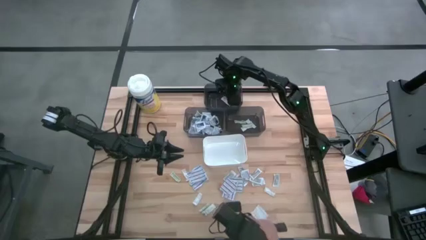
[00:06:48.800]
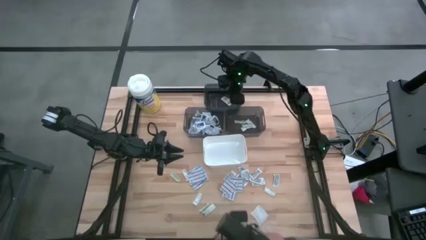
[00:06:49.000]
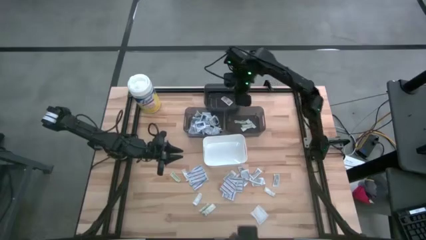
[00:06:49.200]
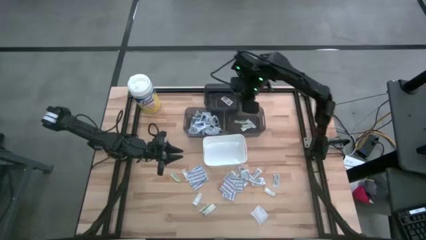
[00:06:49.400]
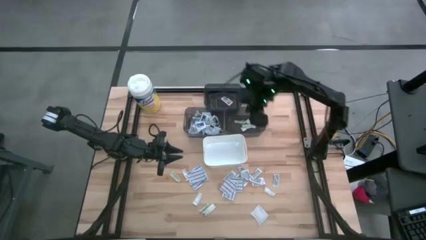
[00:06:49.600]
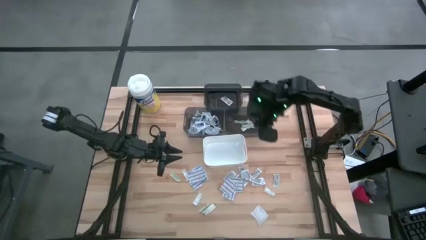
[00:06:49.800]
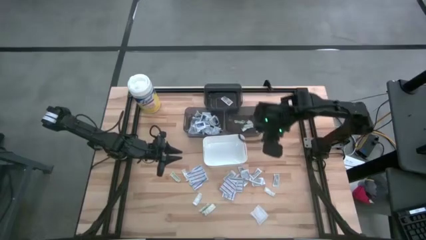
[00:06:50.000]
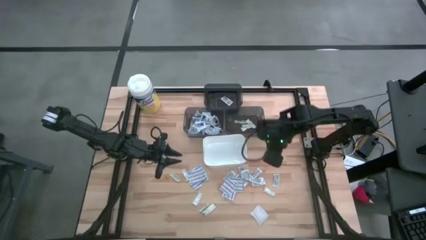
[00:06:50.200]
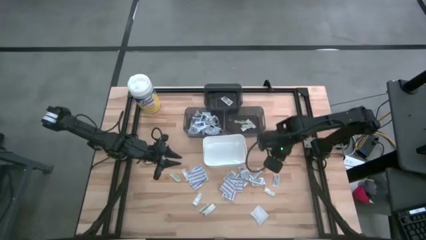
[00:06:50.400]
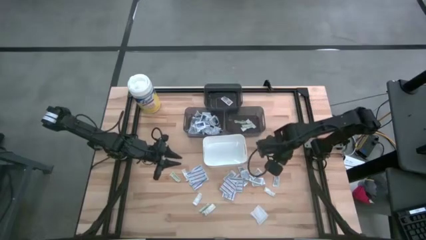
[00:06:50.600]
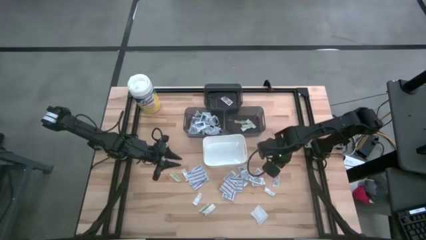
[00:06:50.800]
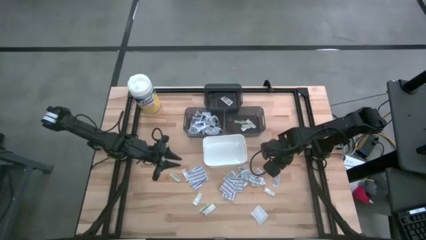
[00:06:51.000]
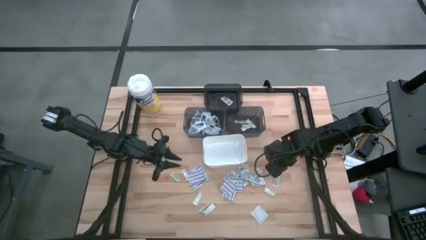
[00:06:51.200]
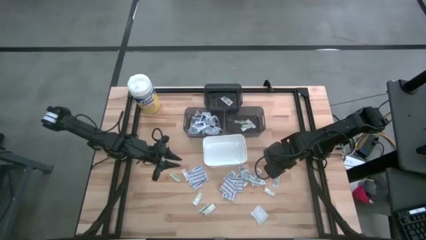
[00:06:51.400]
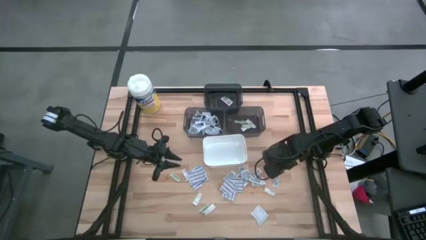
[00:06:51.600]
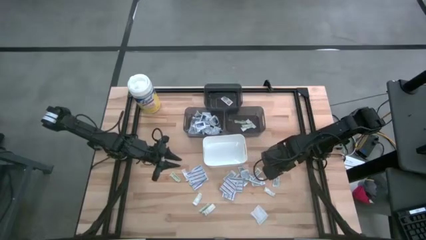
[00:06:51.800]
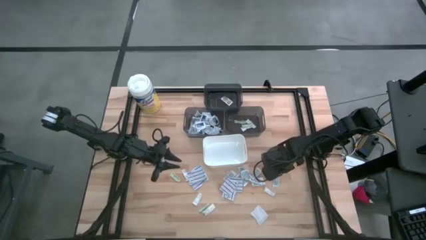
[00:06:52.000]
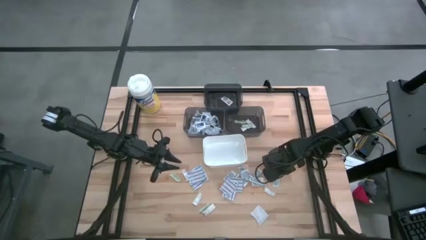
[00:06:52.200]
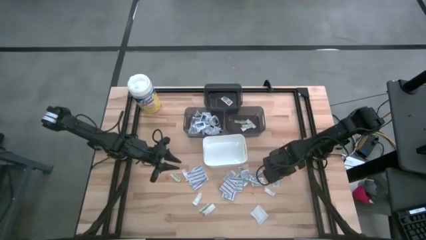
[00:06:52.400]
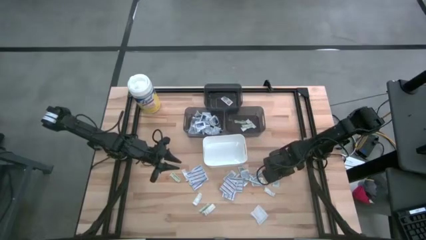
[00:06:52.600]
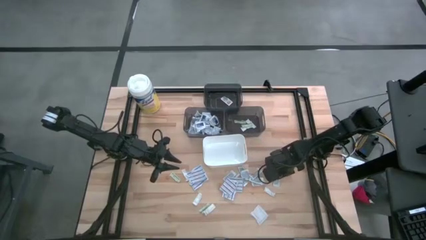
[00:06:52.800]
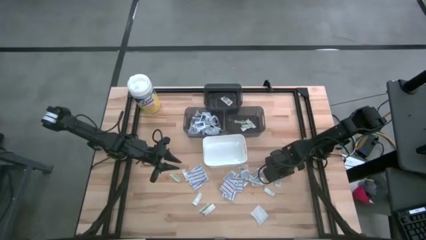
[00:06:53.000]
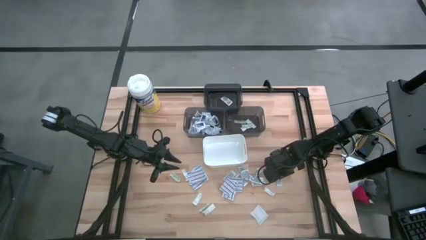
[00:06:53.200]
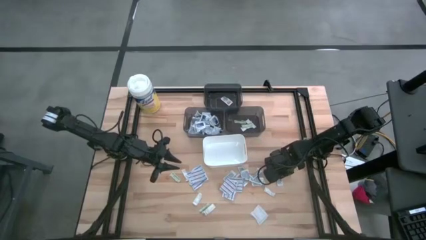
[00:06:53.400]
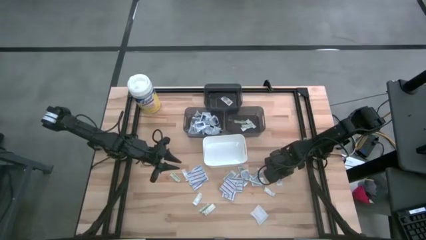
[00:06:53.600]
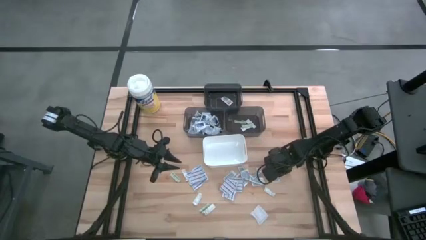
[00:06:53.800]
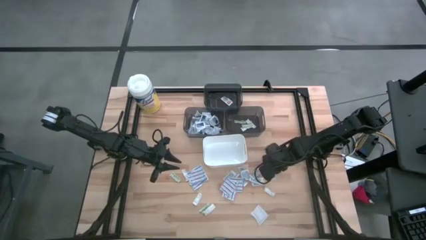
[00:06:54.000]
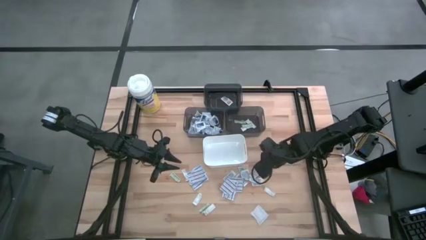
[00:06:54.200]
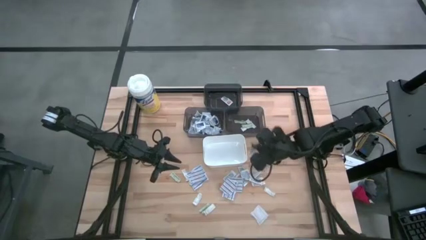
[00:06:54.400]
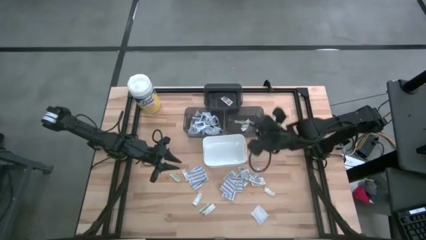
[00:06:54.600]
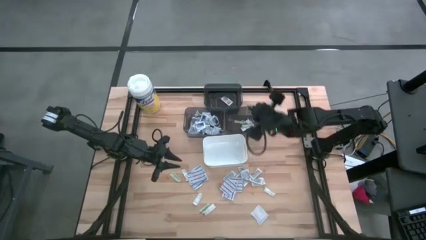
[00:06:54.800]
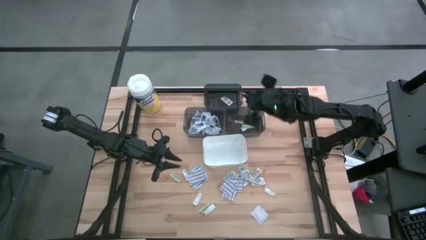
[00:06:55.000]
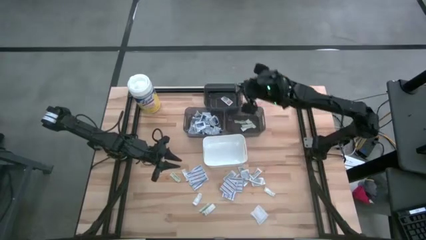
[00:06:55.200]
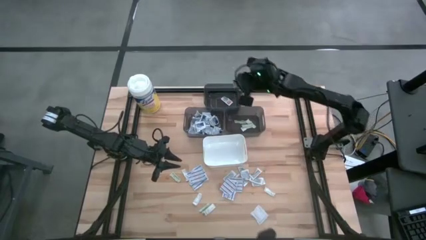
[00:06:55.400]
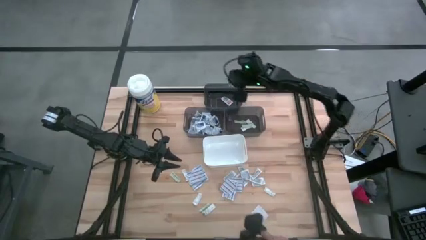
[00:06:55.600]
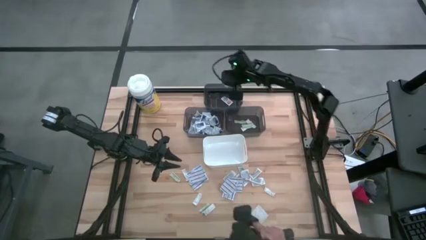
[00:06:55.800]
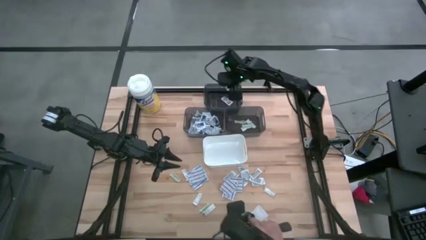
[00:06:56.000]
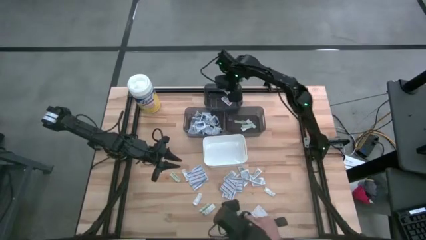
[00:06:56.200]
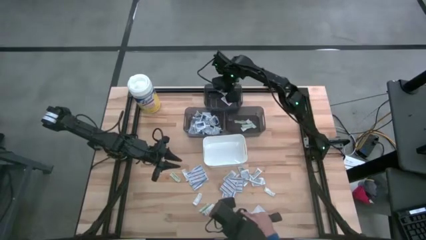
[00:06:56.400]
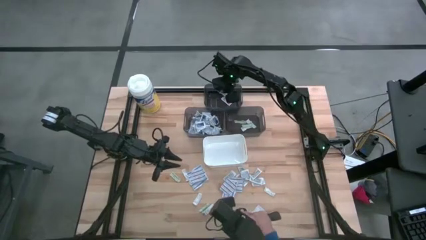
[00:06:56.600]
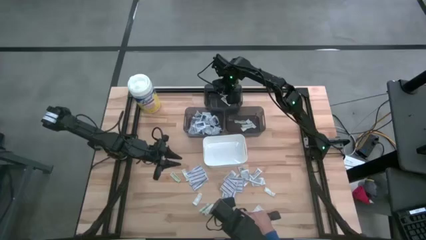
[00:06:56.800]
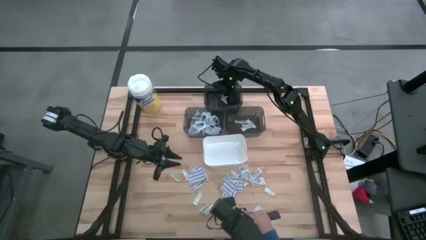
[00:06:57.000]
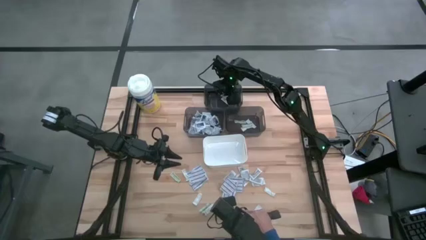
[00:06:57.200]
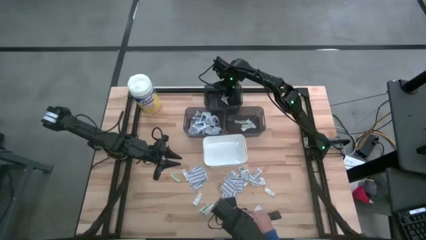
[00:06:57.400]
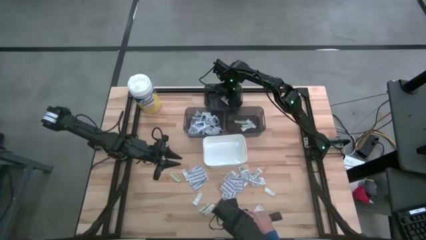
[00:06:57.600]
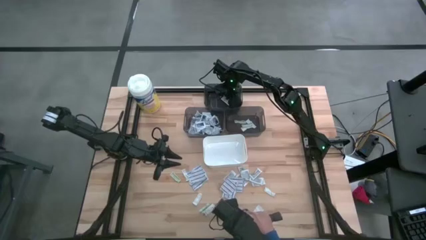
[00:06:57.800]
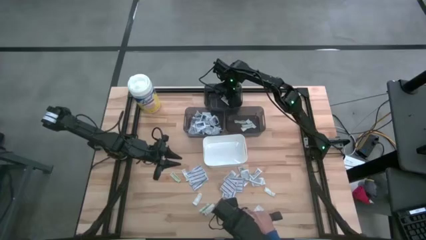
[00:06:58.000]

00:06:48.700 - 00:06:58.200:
Task: Pick & Place First Aid Supplies
Put the ointment pack into the top black bin

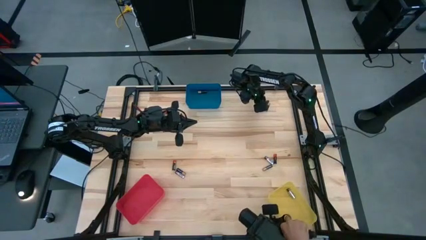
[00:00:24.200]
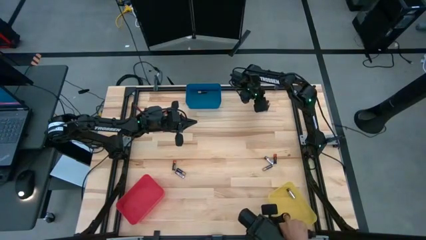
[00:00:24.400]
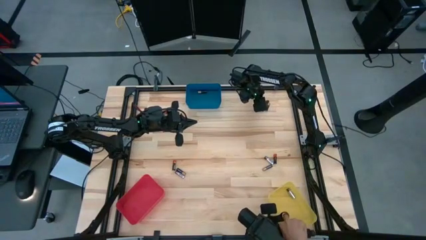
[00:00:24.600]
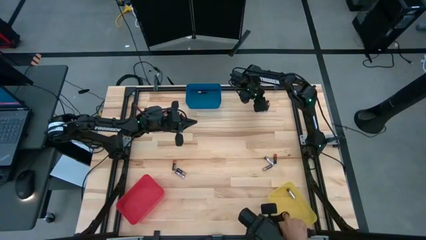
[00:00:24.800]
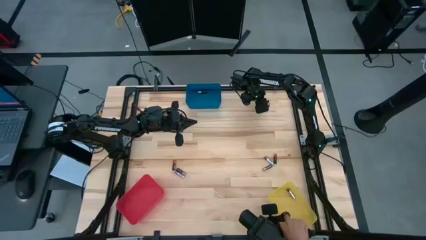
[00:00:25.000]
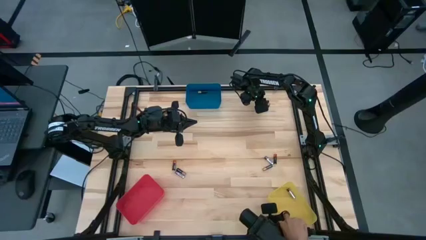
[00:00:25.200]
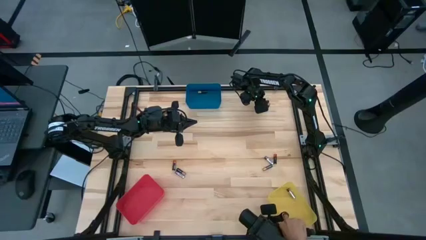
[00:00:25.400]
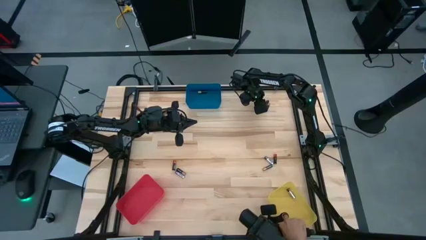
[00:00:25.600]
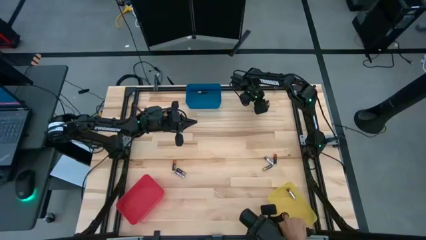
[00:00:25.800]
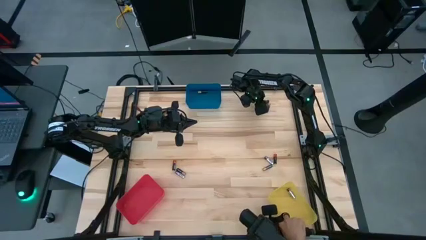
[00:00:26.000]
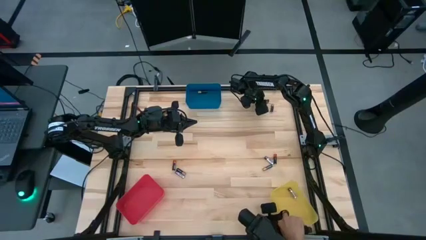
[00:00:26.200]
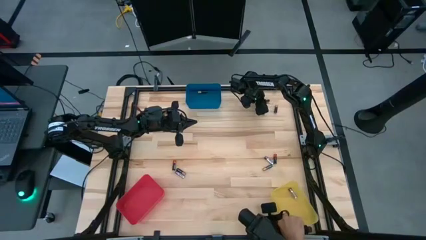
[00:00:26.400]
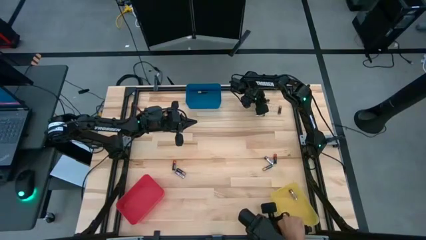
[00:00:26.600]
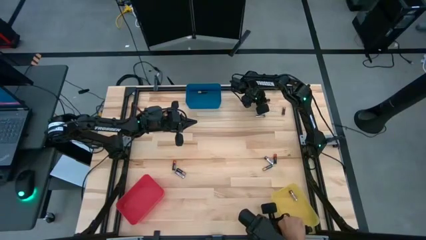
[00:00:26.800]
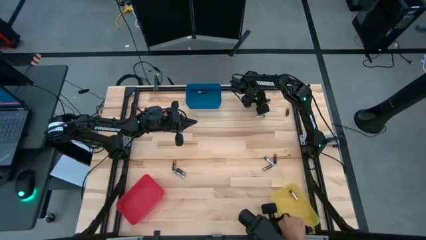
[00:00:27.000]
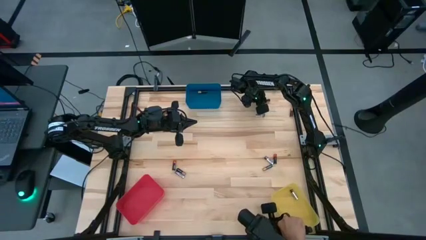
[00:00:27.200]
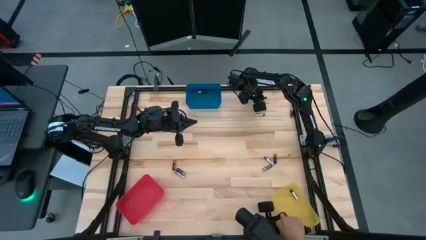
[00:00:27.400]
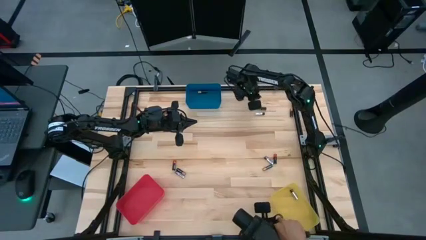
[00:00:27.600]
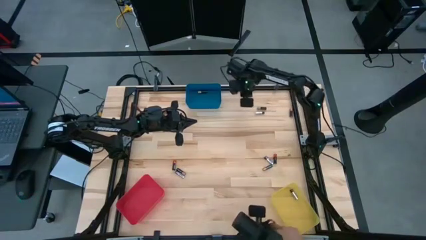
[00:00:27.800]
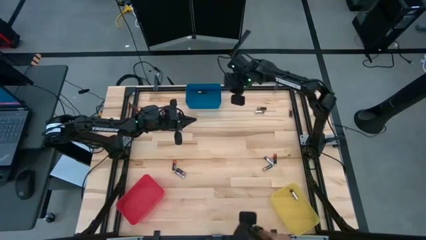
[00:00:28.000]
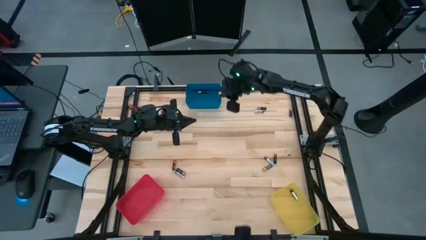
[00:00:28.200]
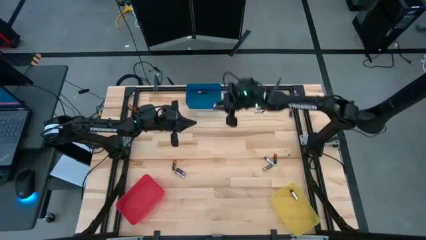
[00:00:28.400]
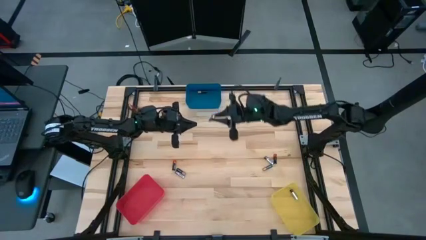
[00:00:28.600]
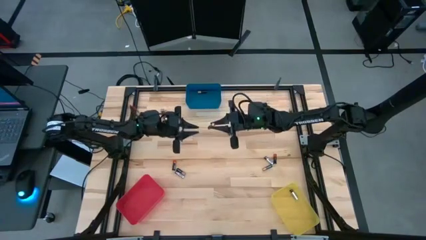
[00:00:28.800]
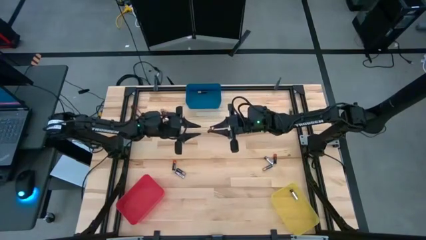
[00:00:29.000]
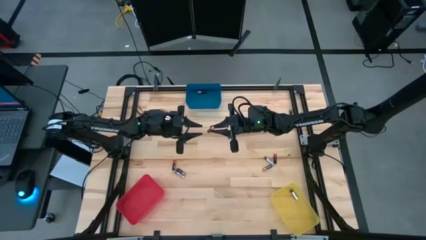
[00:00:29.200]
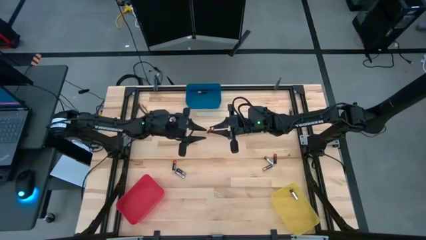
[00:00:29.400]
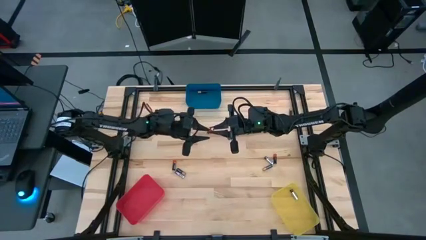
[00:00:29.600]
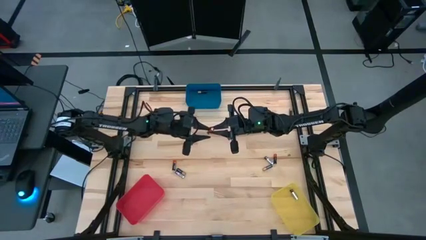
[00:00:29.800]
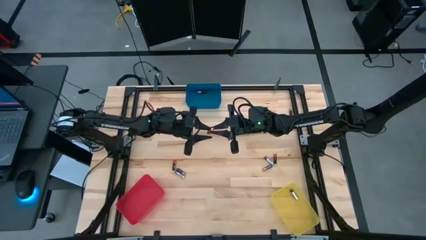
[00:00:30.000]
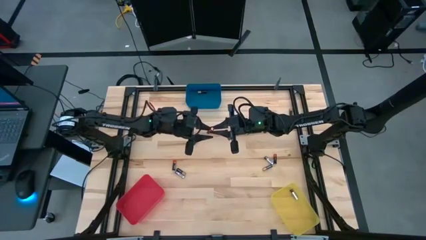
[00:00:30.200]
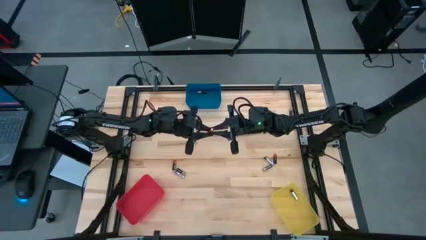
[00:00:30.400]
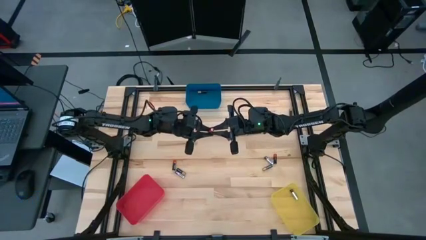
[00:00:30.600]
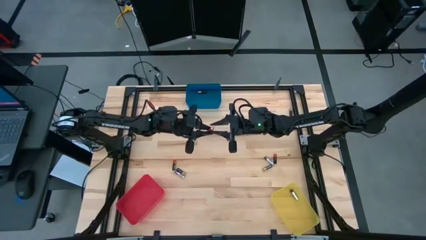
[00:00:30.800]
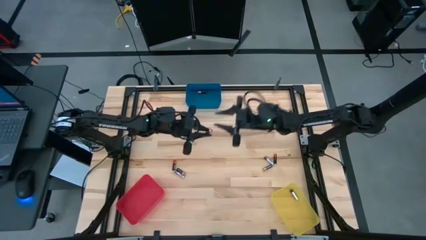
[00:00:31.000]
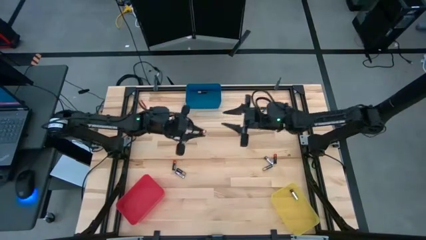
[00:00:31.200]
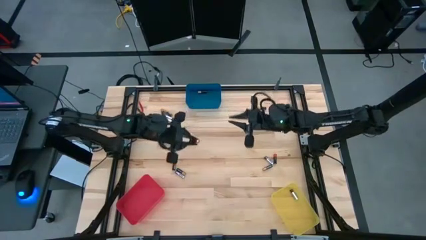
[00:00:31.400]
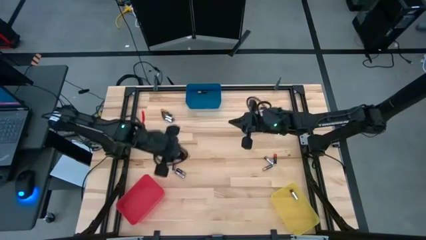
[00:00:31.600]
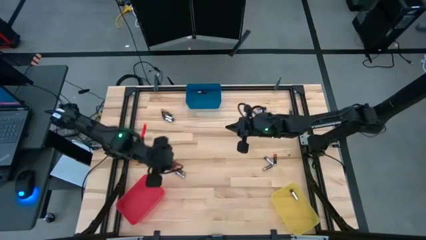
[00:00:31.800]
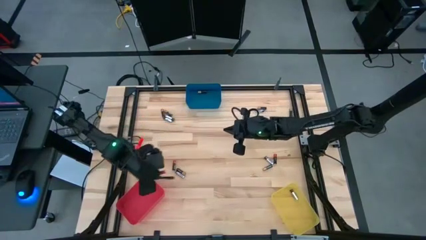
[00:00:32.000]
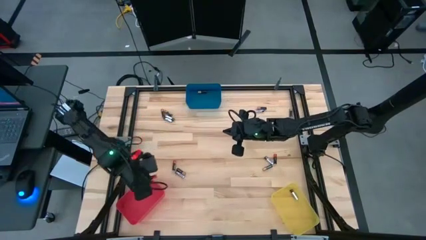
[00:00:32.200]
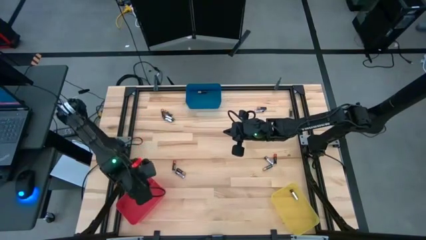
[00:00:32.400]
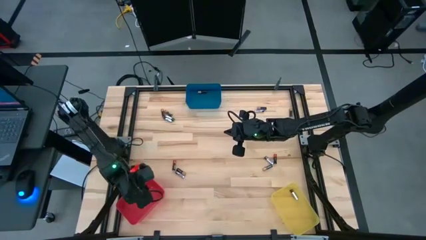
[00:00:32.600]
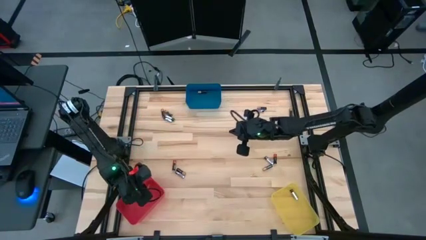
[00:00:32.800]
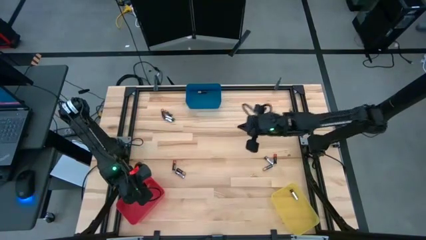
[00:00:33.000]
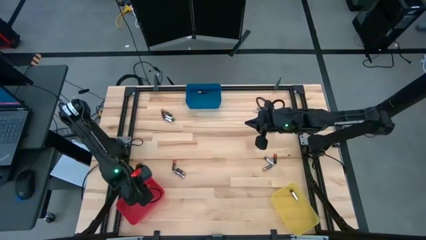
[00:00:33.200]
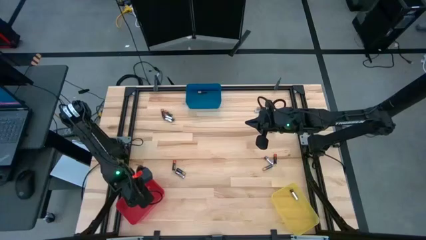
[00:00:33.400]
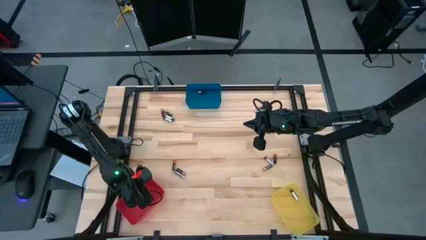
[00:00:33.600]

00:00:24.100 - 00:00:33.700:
Task: Sort batteries
Put the black-red battery into the red bin
